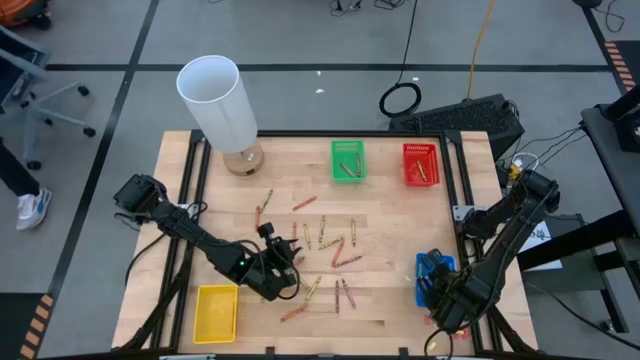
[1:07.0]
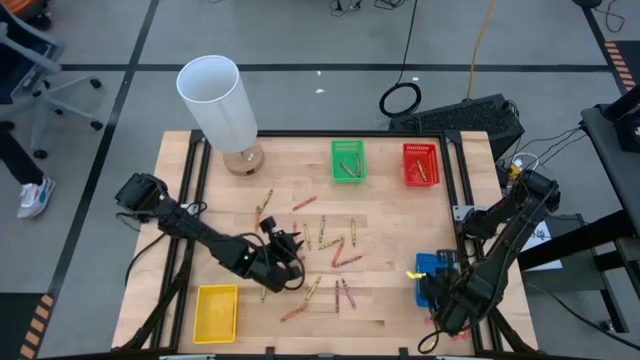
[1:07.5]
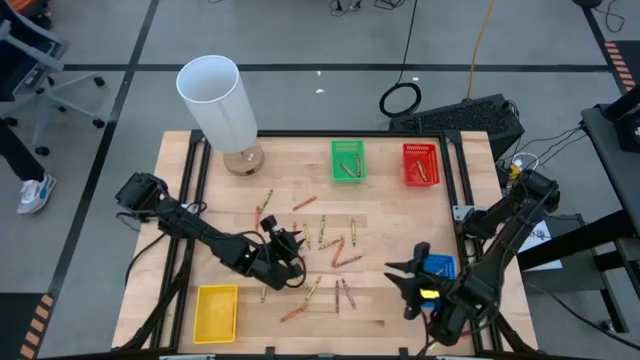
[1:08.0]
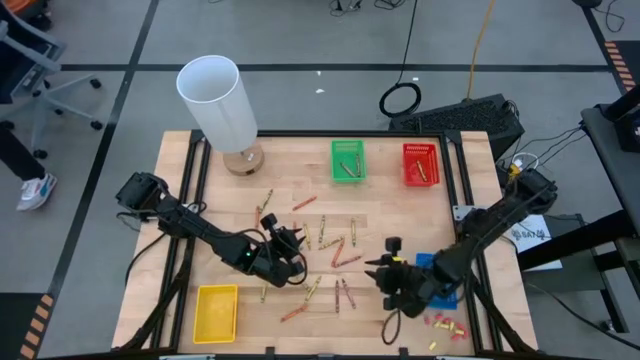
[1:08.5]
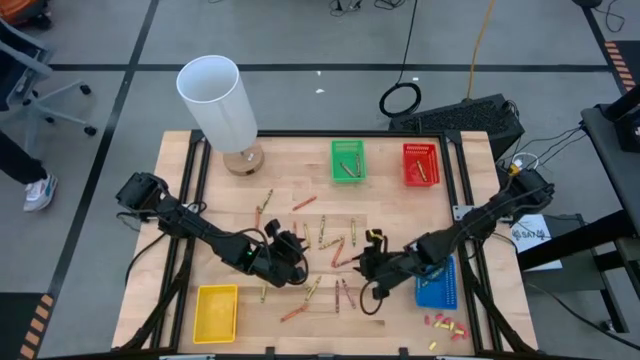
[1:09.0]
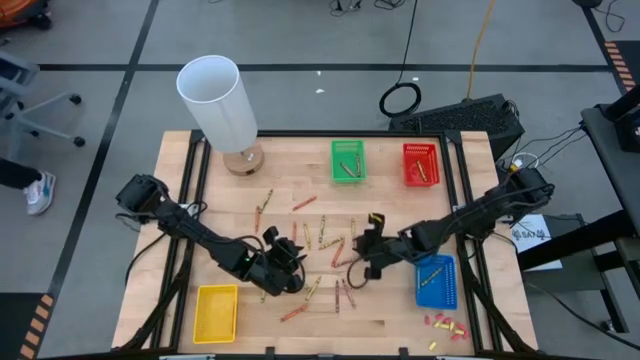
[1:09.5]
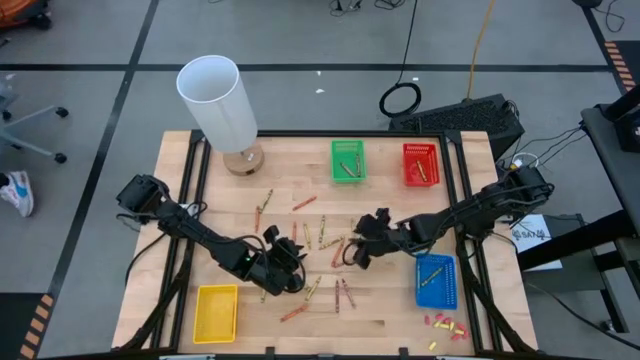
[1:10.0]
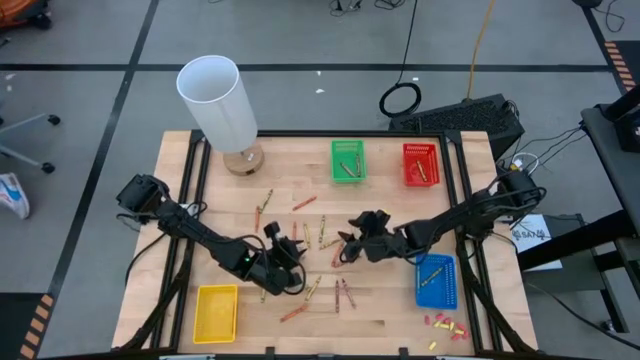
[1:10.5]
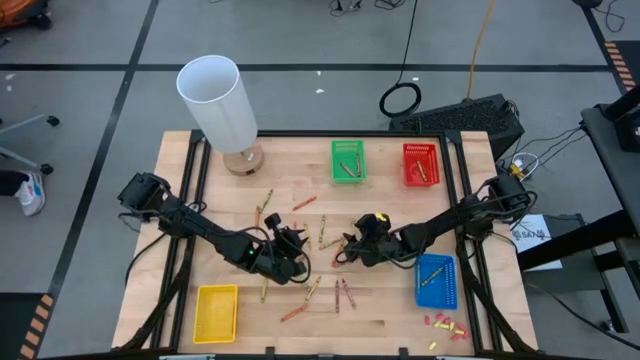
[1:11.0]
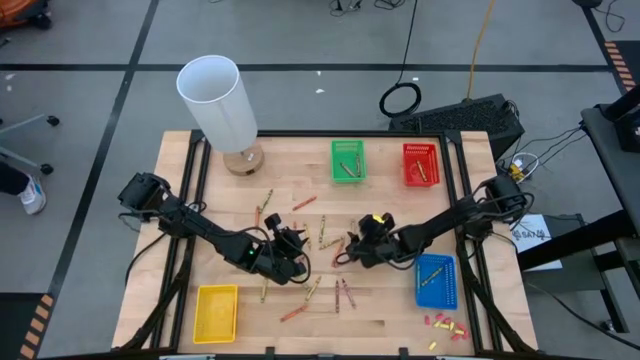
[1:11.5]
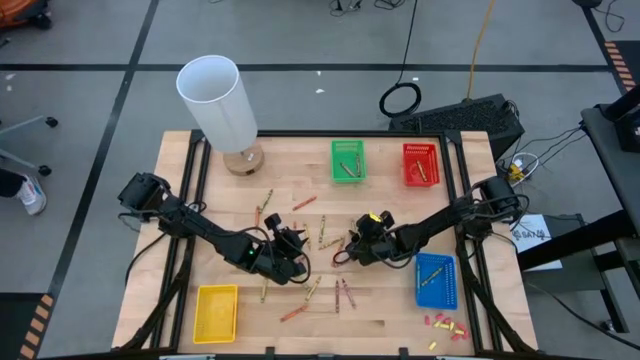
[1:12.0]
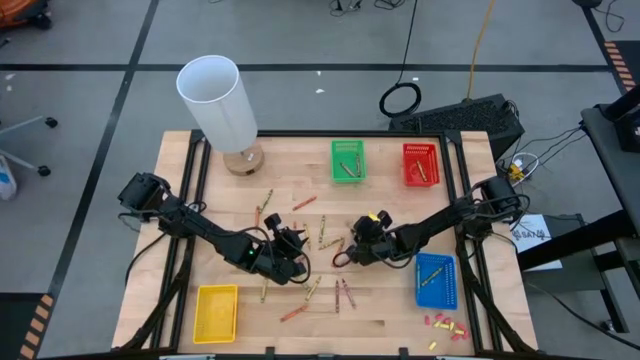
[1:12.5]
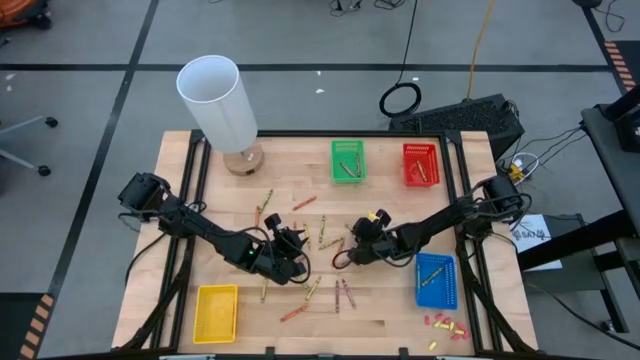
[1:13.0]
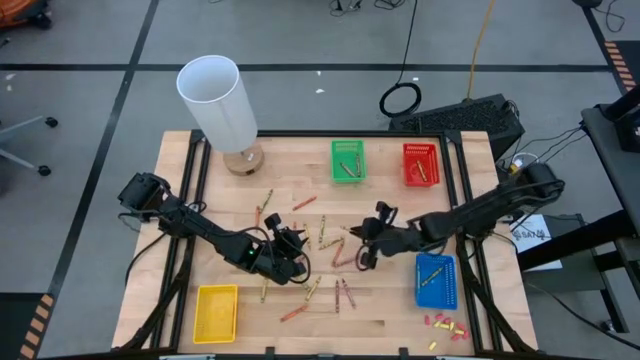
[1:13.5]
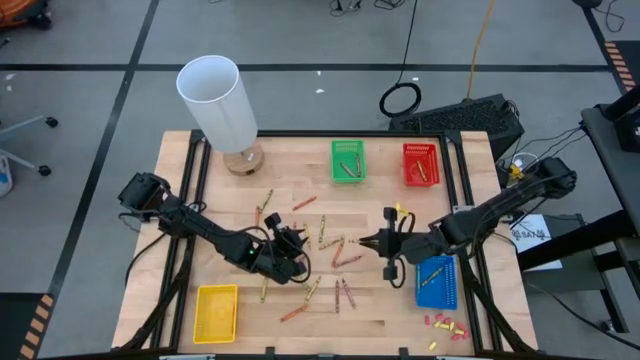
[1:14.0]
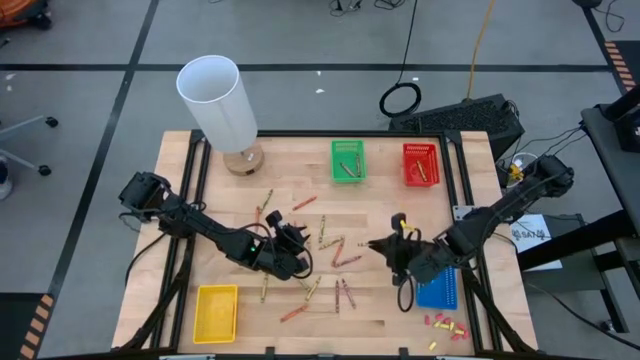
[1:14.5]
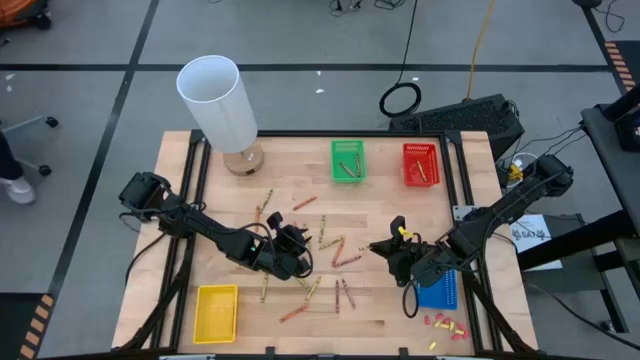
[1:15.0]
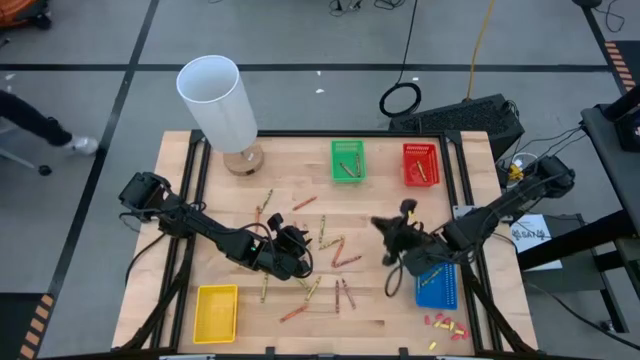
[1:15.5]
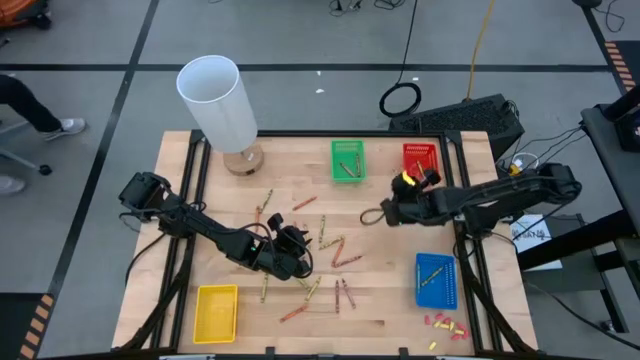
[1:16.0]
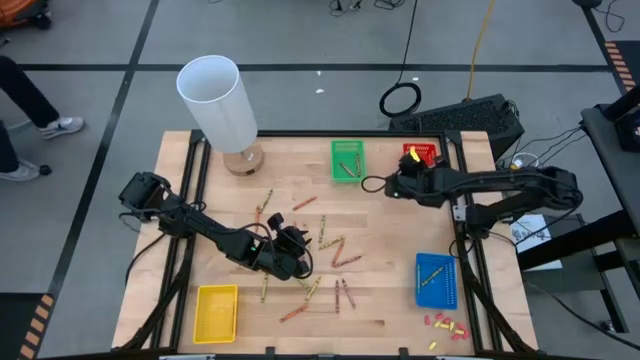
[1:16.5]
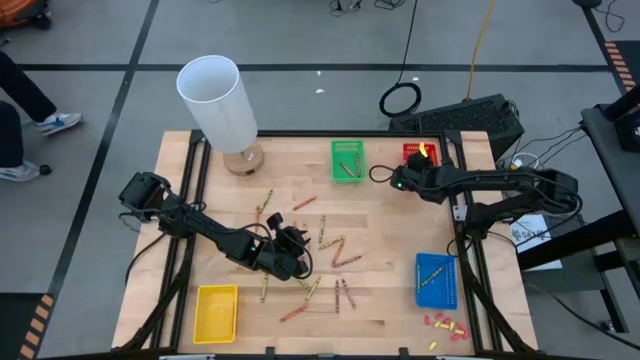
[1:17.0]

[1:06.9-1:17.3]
Task: Sort crayons
Put the green crayon into the red bin

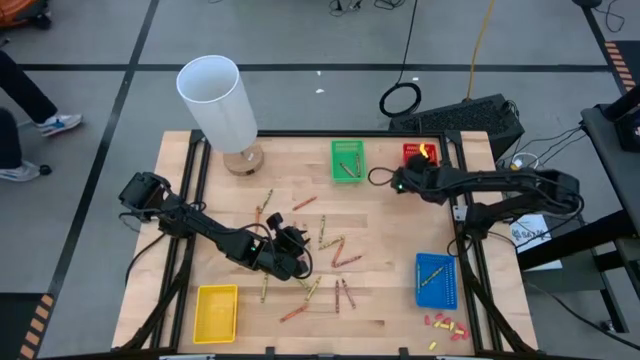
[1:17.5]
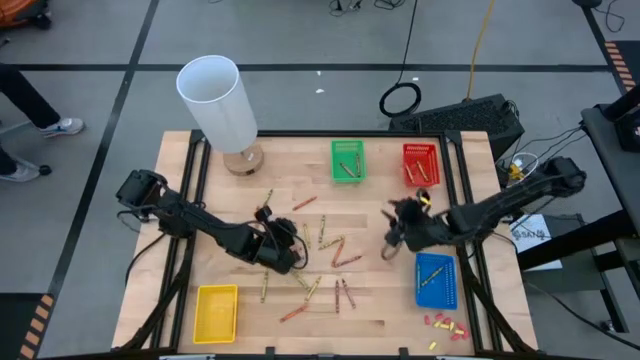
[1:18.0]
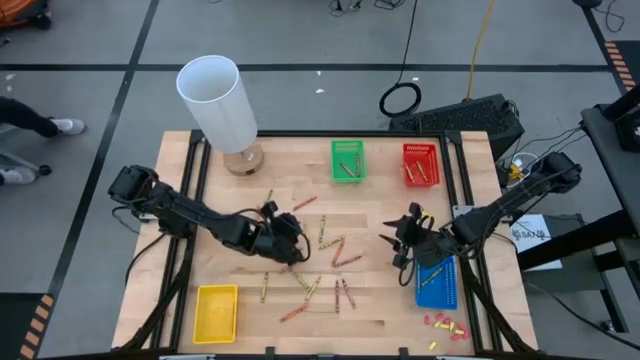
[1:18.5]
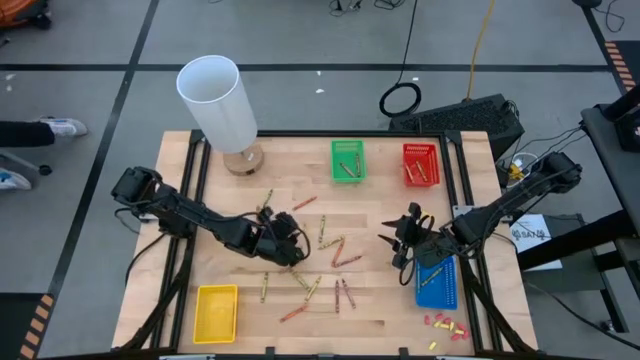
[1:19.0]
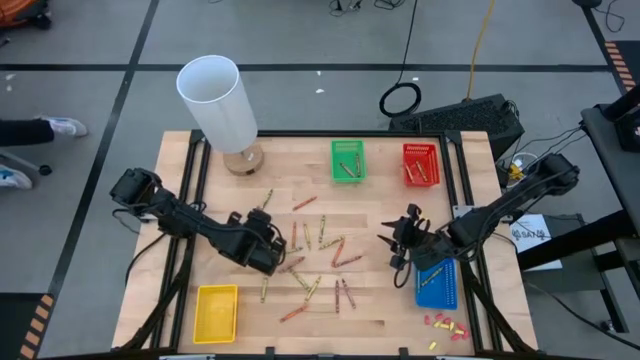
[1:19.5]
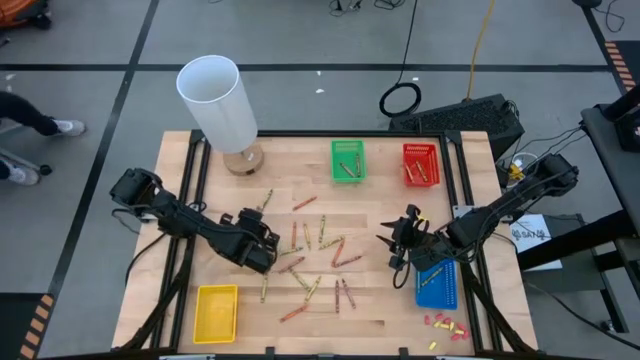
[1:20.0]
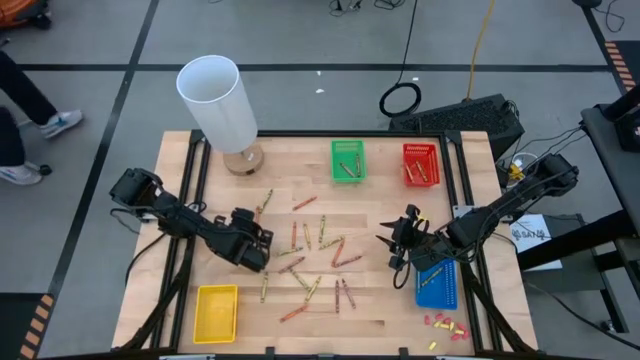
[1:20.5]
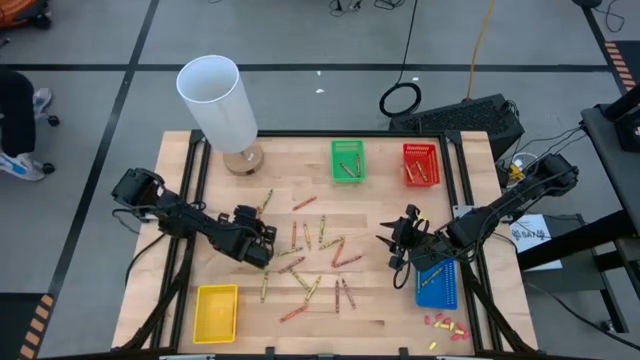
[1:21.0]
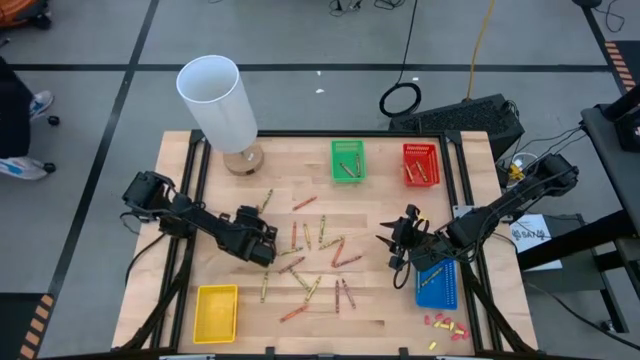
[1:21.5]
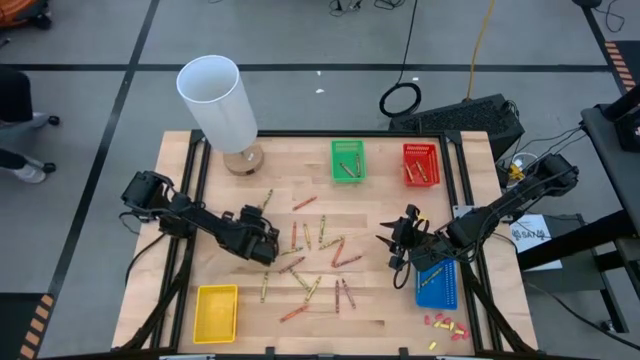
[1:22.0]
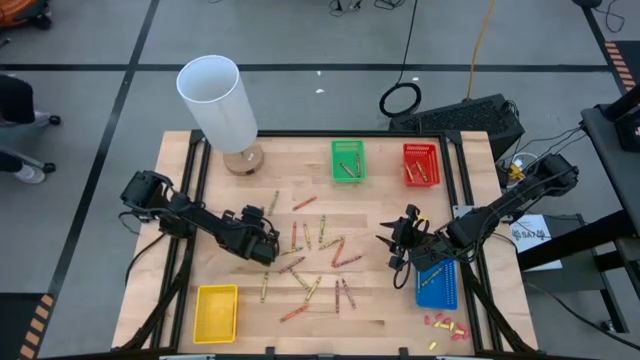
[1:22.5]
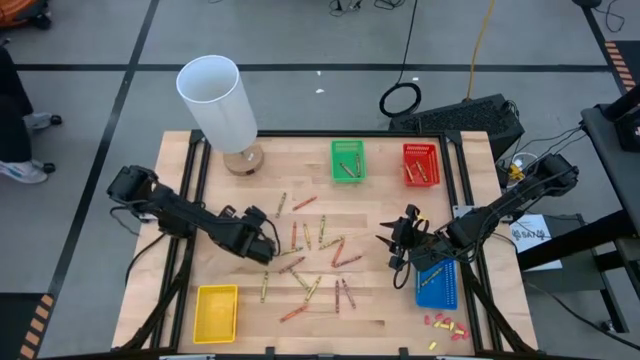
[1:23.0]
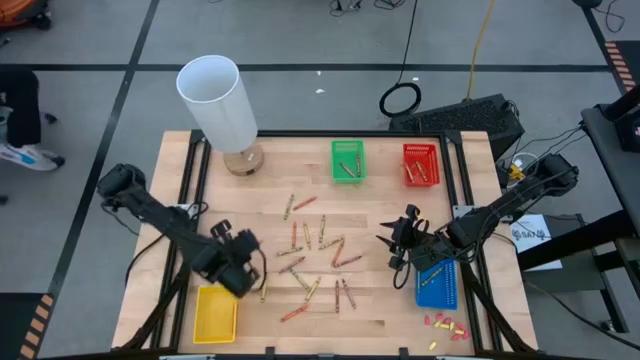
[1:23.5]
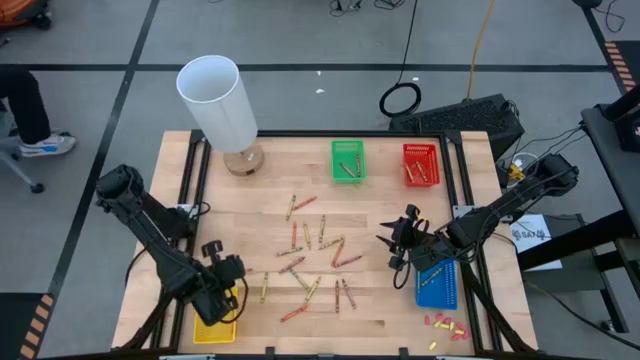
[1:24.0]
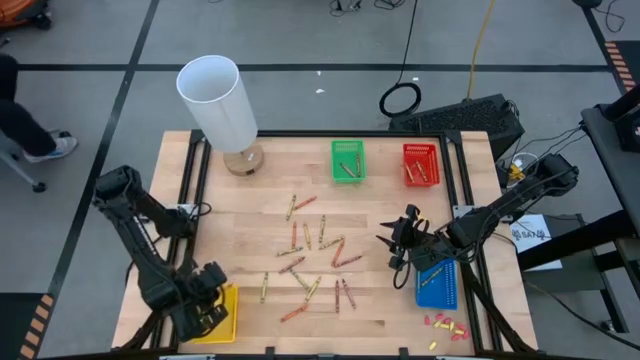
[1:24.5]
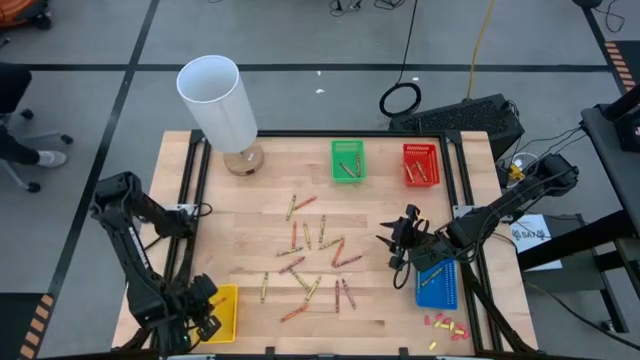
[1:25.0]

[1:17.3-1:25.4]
Put the orange crayon into the yellow bin

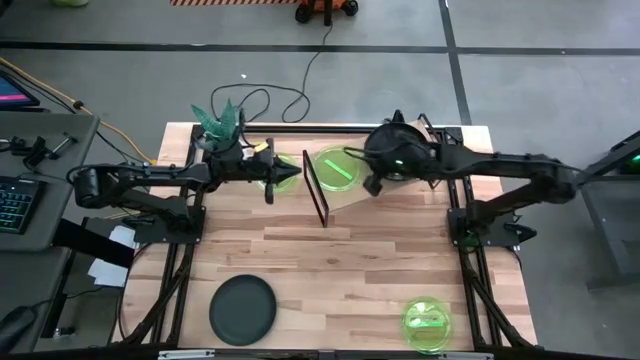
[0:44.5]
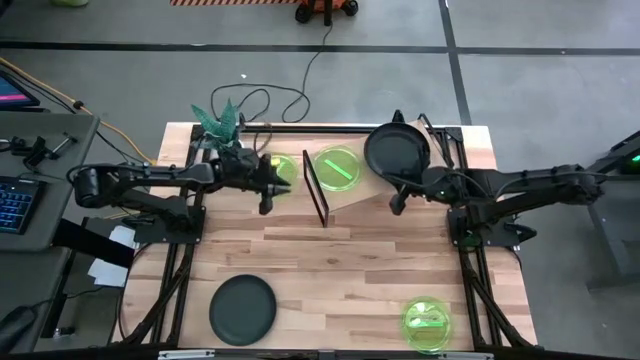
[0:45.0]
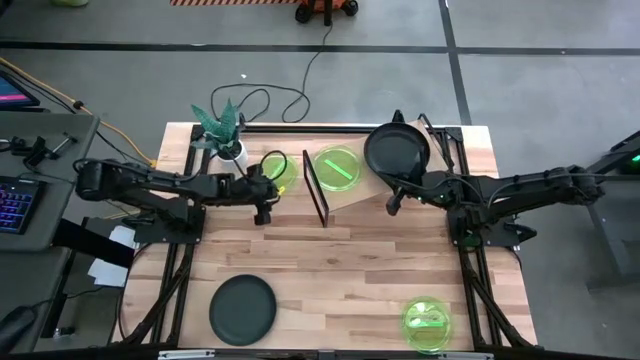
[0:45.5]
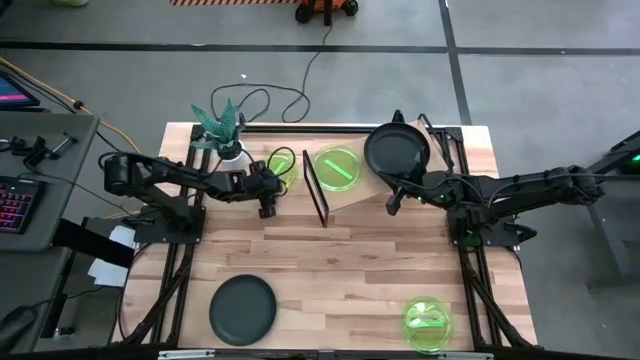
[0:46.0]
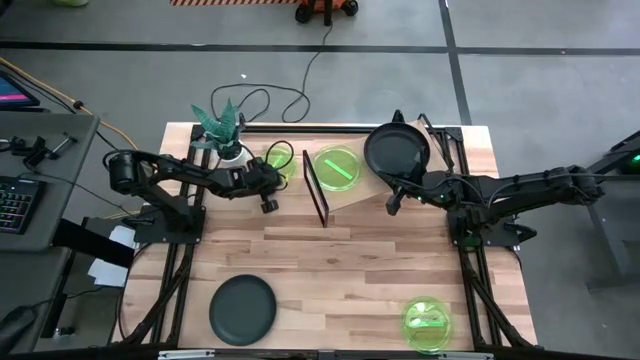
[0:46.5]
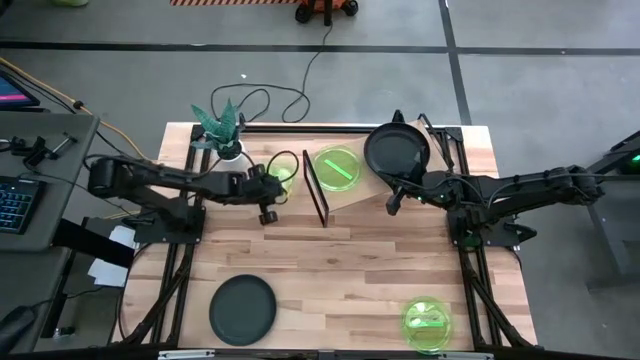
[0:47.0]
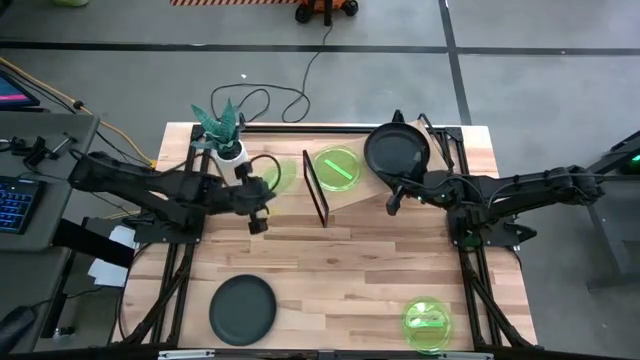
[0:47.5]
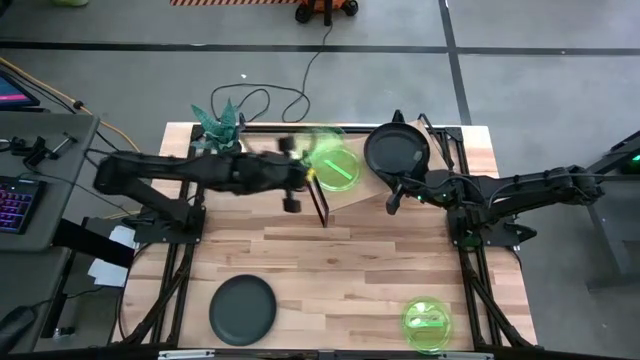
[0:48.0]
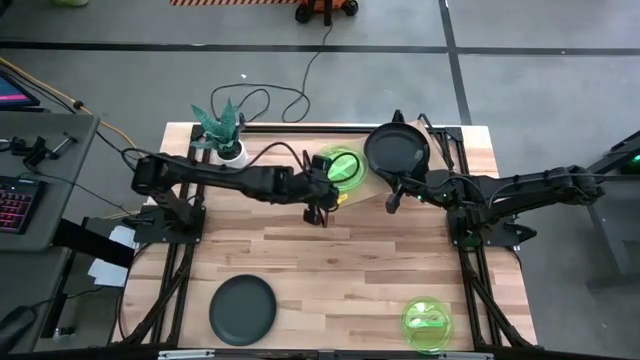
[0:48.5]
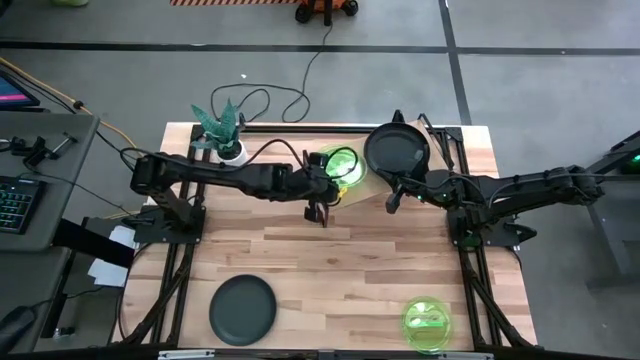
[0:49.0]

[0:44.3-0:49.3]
Task: Place and stack plates onto a shelf
Stack the top green plate on the green plate on the shelf
